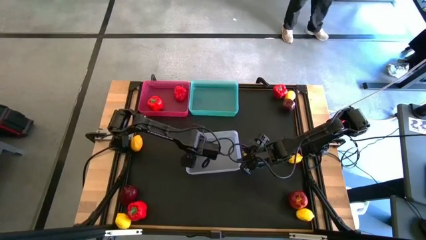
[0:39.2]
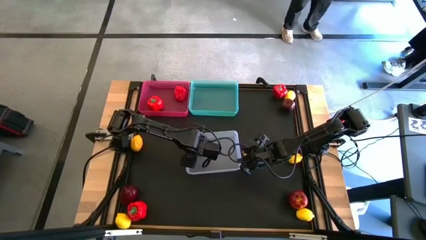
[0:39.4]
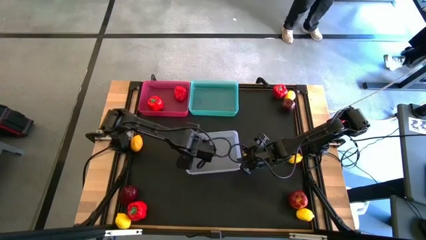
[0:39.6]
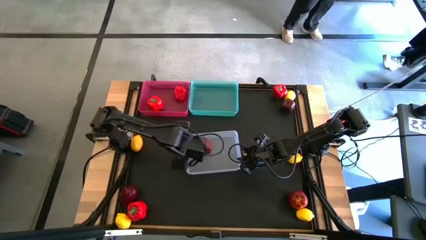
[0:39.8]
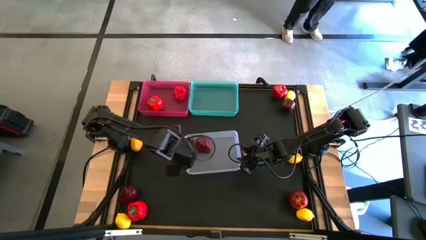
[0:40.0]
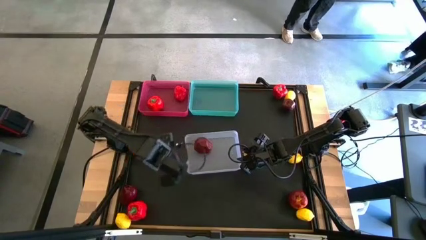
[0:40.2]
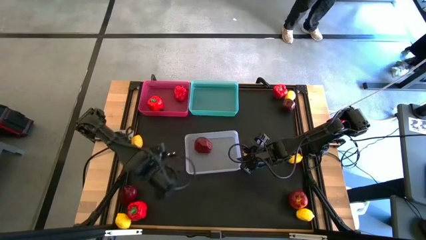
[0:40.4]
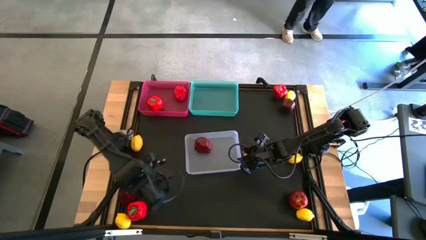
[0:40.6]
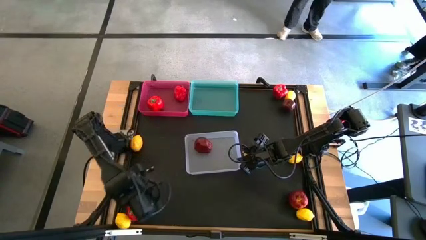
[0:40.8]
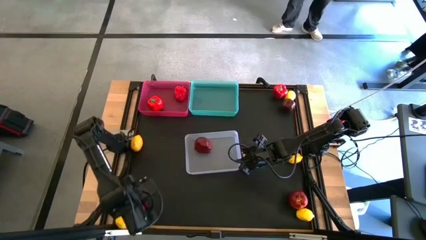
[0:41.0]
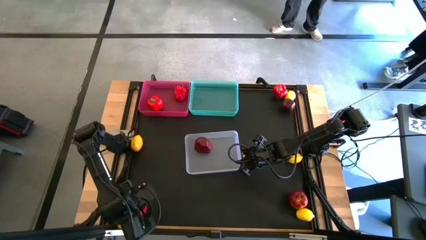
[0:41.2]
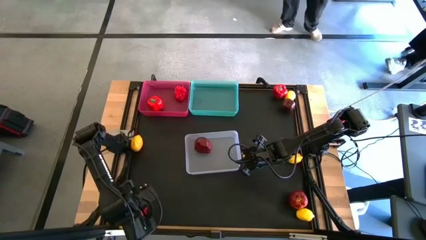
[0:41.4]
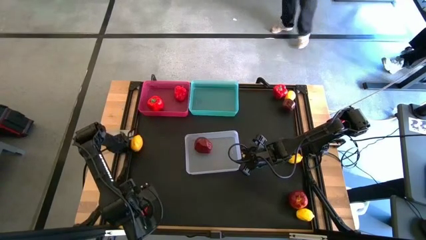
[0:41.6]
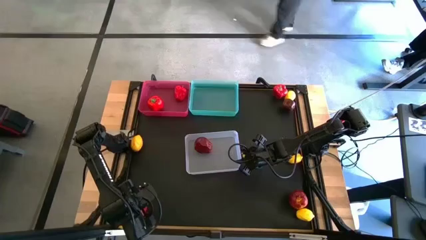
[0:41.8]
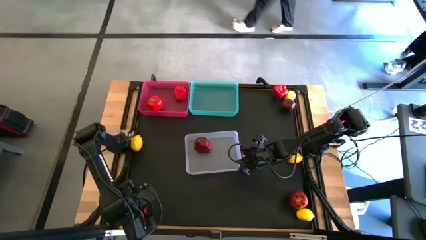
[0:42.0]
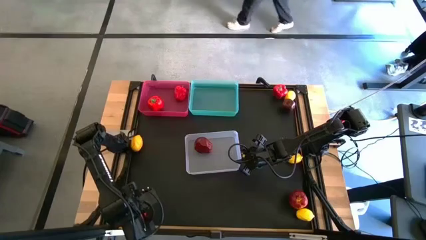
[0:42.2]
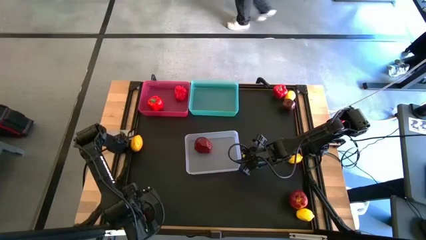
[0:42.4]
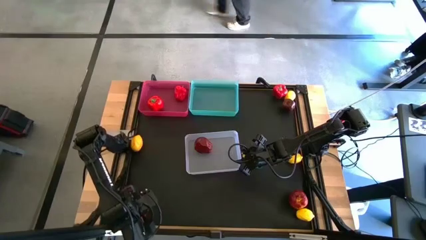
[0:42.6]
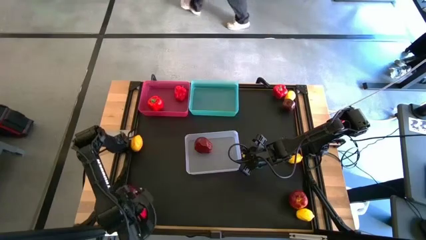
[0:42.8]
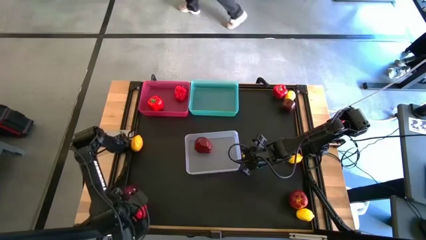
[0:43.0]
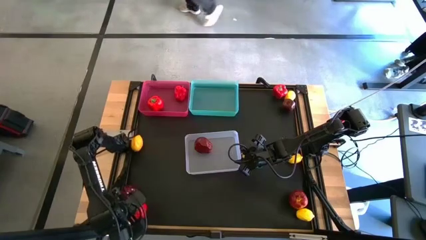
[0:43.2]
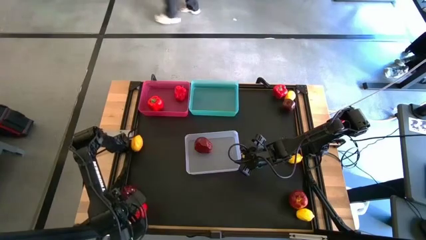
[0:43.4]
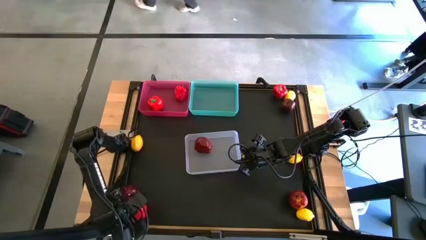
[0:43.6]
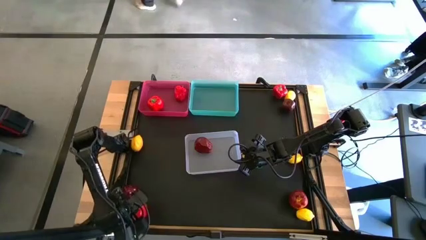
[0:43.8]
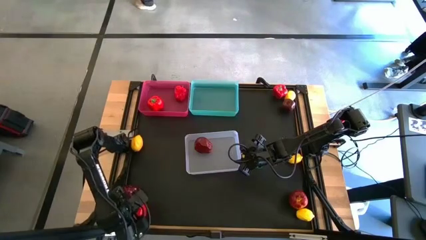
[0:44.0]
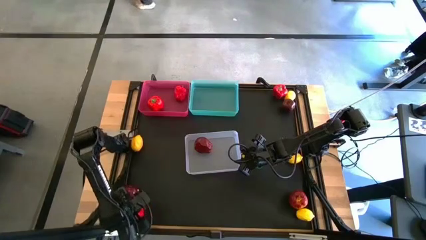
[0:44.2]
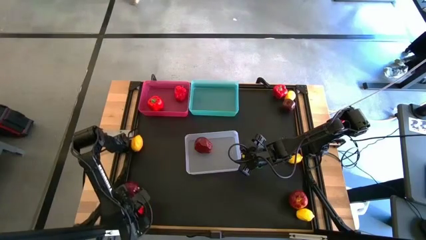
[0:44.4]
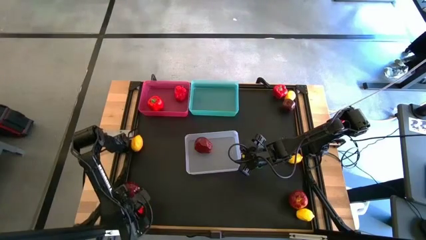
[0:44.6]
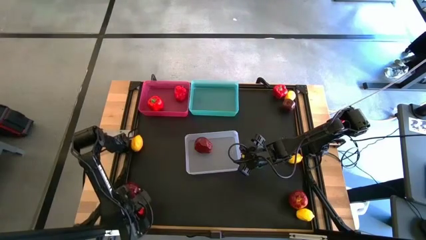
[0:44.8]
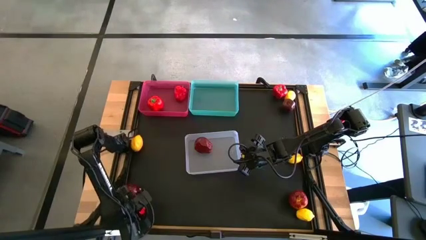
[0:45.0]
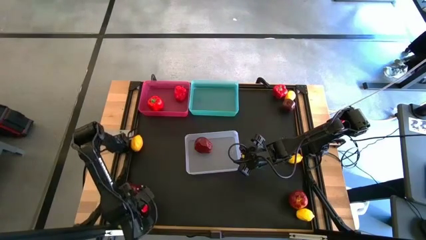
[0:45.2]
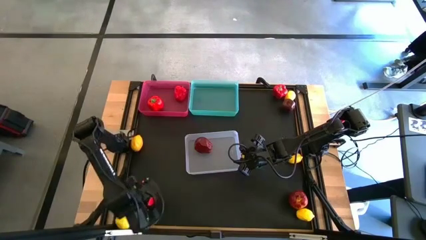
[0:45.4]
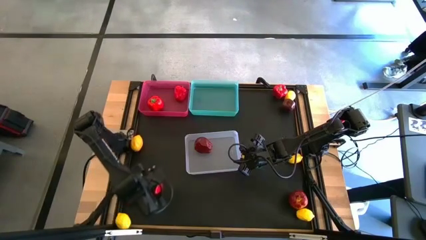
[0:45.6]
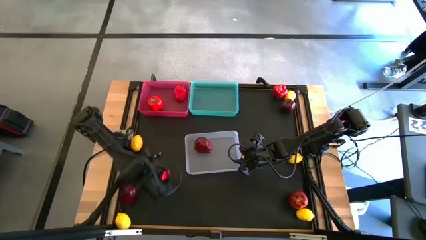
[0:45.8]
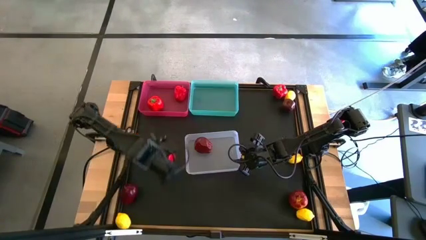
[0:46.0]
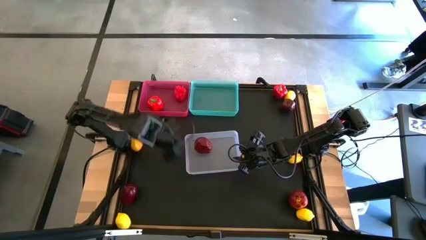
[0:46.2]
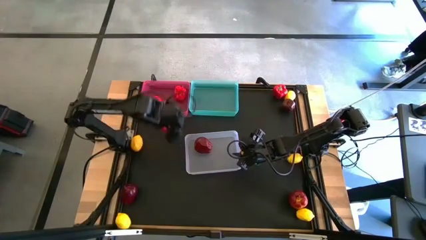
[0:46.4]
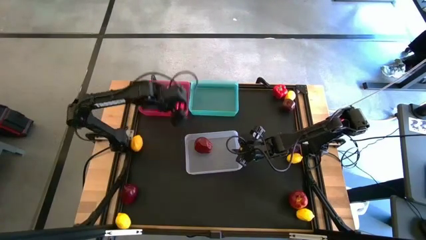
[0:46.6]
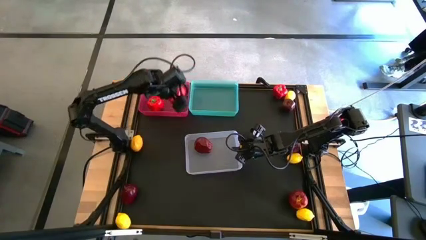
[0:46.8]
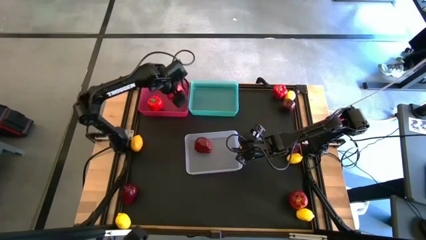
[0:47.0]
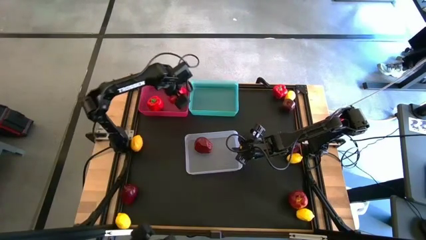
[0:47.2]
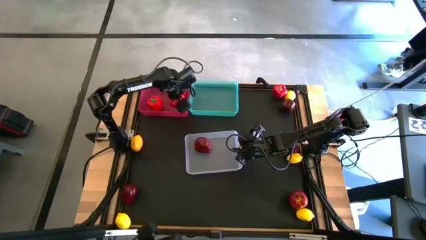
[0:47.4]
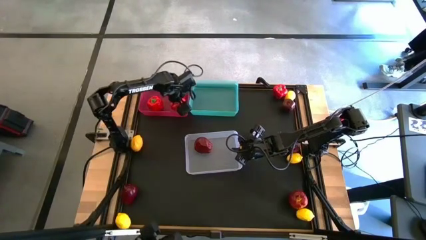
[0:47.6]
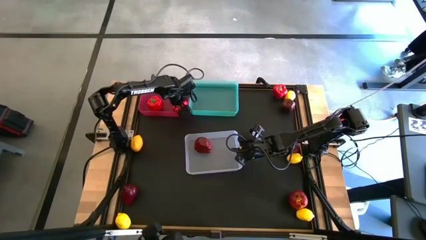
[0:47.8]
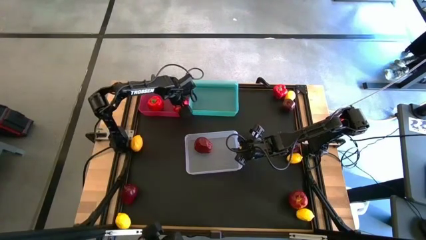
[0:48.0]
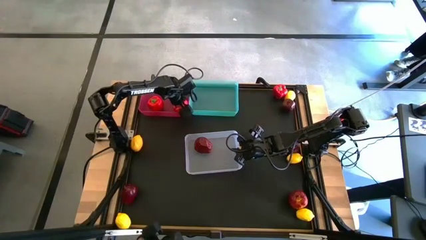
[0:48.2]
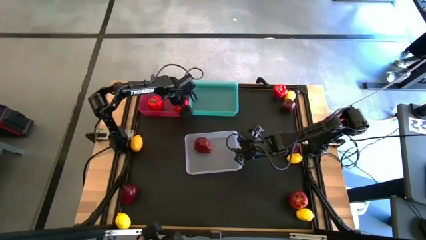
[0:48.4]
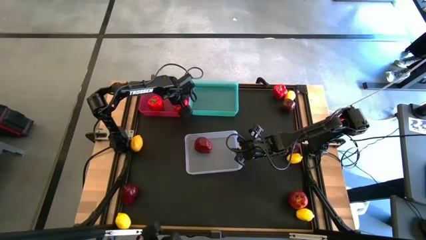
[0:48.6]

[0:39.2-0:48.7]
Task: Sort produce into baskets
Put the red bell pepper into the red bin

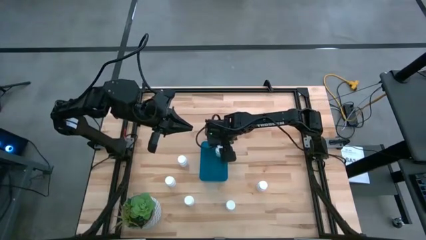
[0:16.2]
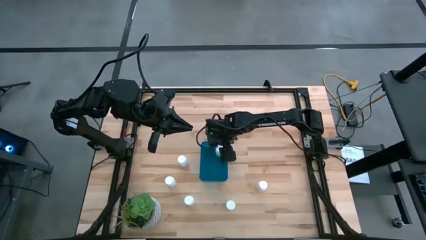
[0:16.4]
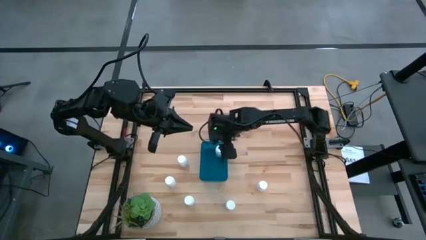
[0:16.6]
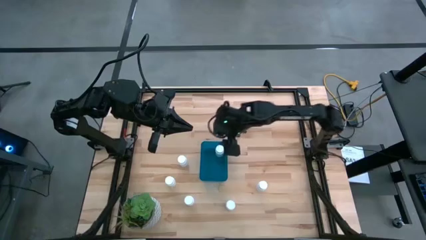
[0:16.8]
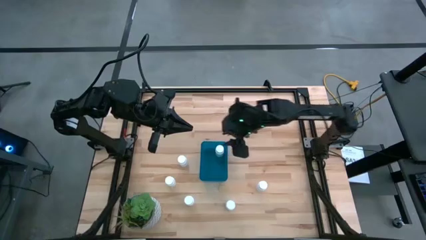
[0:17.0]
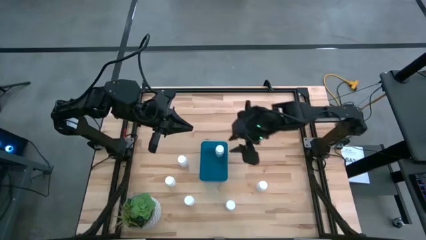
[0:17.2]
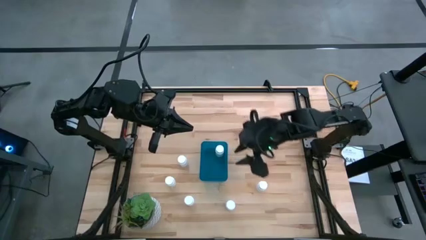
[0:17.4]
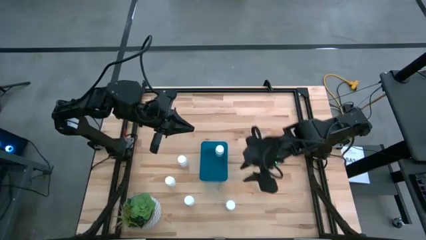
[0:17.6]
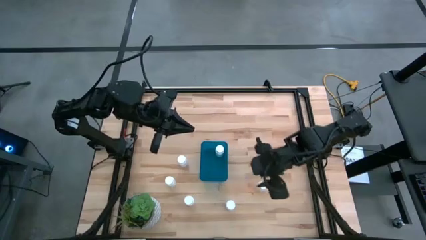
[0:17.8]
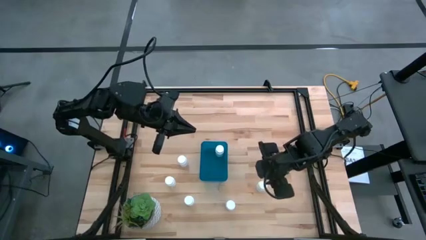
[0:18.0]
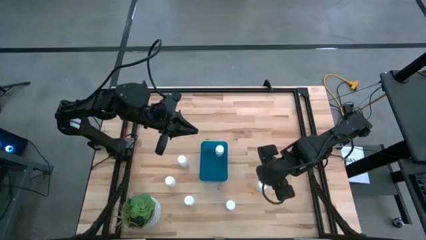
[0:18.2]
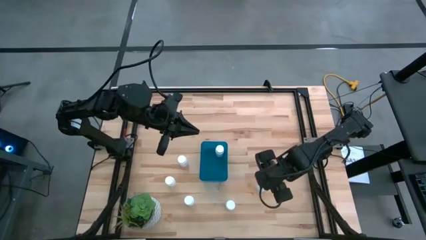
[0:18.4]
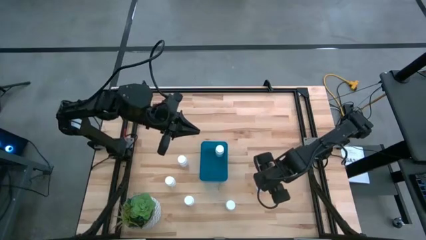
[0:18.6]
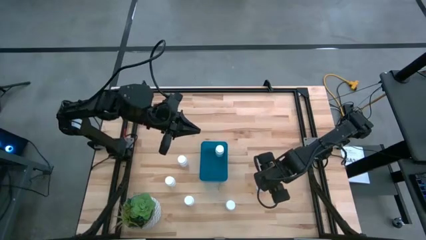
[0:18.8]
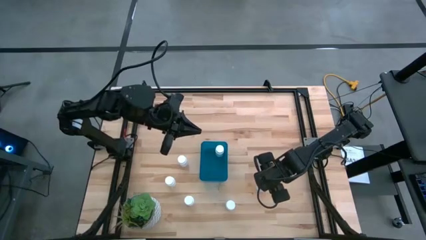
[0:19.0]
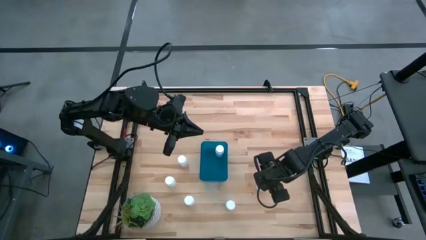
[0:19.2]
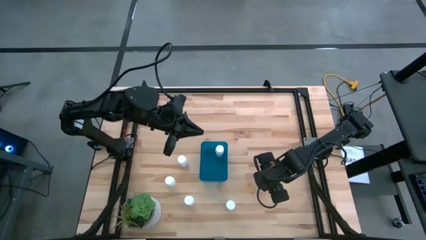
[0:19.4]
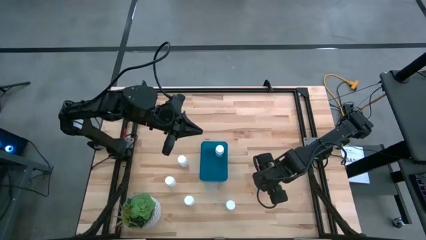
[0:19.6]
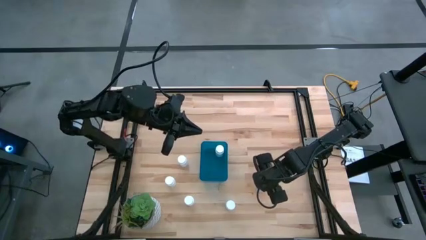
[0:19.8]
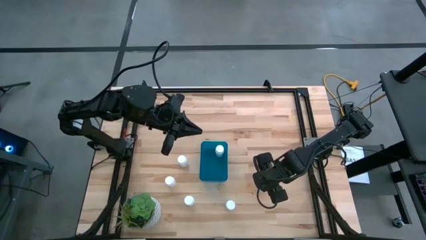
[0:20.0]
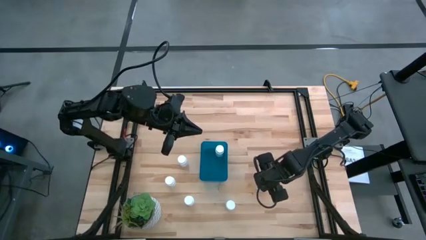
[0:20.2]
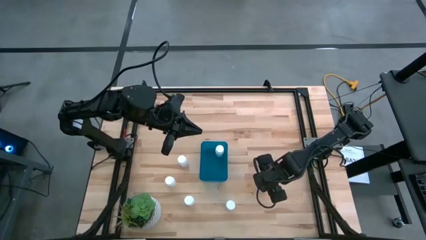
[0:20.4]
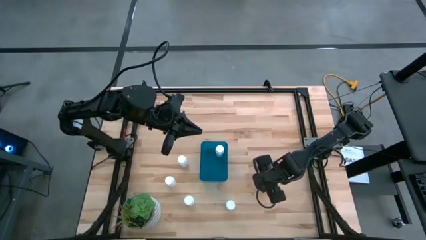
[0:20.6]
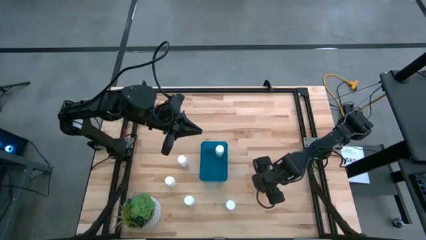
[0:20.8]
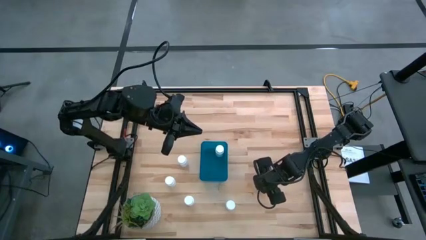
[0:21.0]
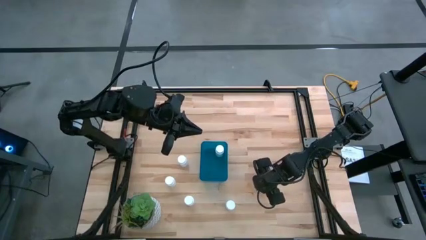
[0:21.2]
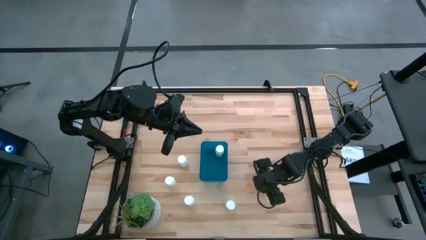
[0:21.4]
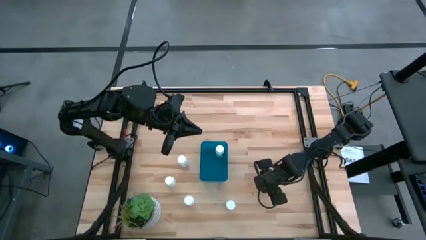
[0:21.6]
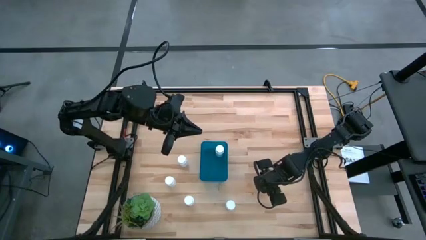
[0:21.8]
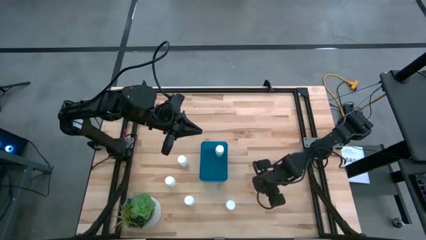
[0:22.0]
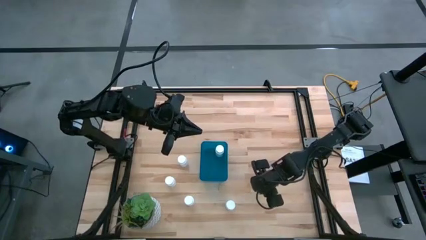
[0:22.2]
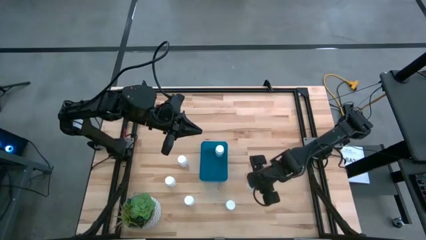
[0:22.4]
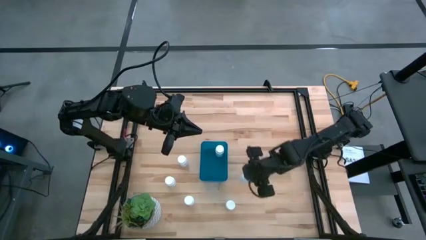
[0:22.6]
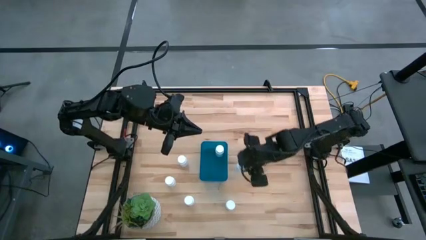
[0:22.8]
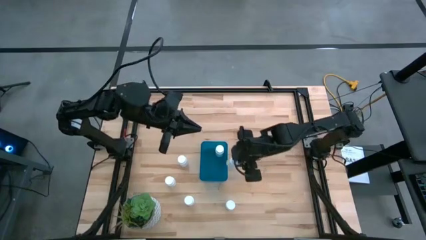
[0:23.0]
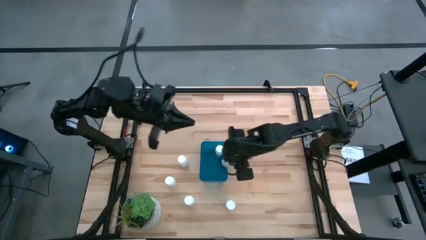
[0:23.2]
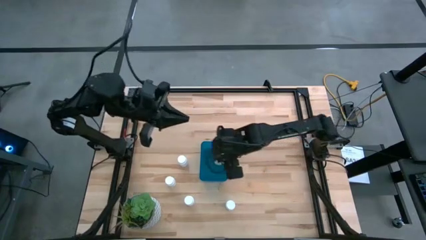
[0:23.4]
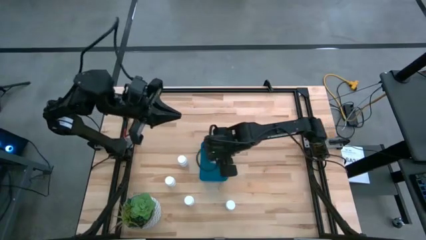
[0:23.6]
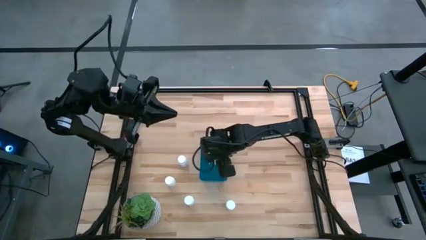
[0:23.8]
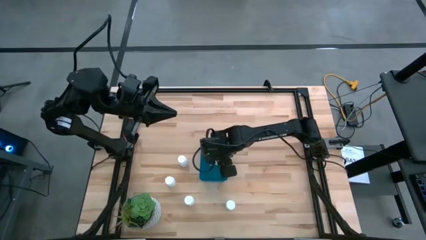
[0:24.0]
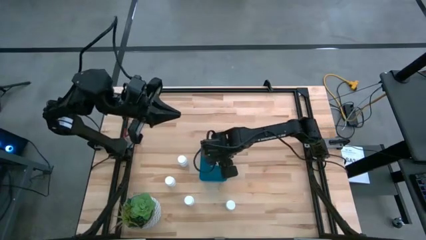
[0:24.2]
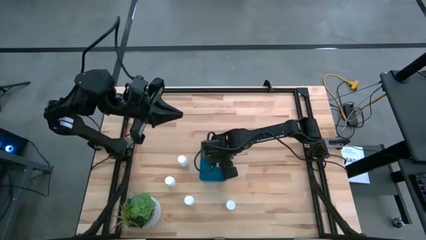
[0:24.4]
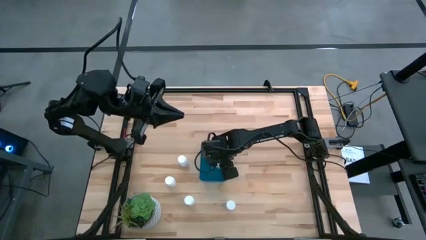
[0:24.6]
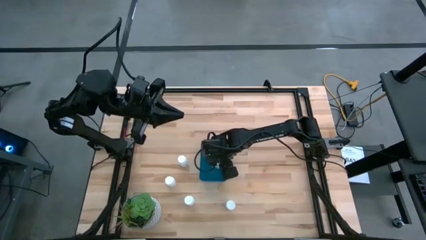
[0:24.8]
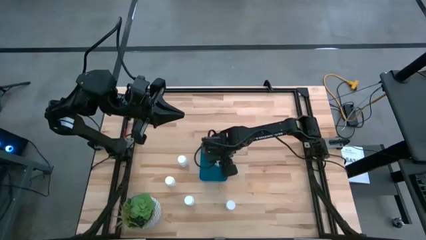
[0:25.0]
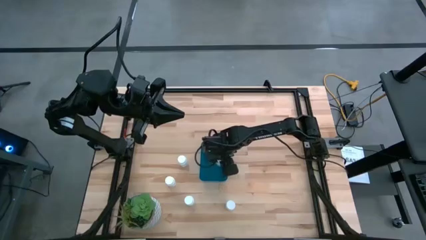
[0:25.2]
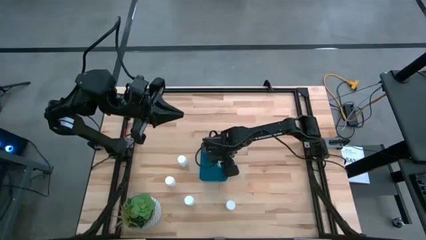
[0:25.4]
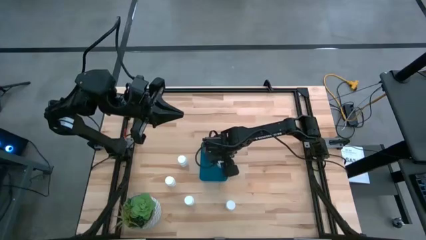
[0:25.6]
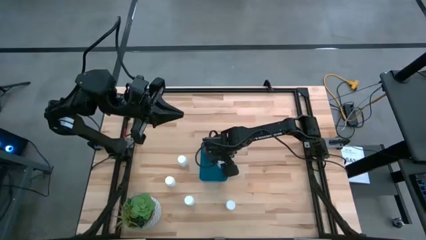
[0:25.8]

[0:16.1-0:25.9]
Task: Pick and place pill bottles into a basket
Put the pill bottle into the bin
